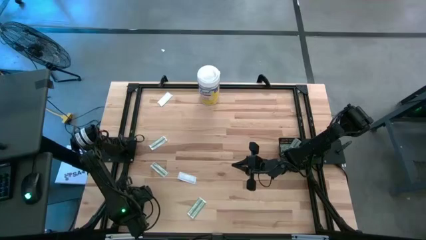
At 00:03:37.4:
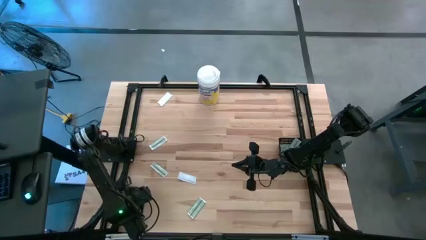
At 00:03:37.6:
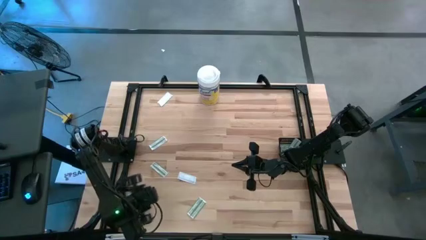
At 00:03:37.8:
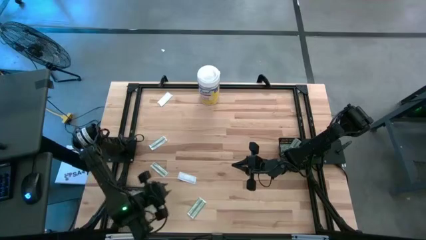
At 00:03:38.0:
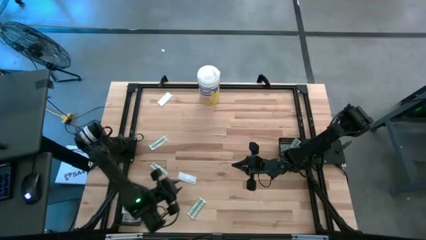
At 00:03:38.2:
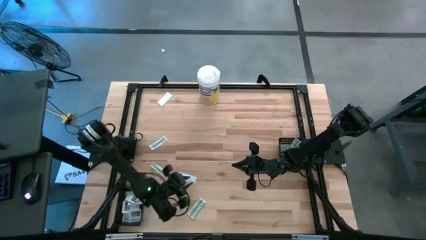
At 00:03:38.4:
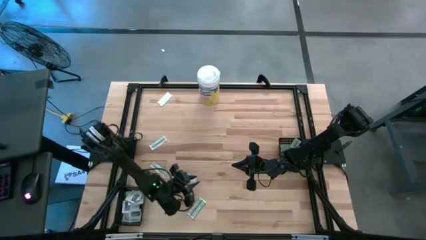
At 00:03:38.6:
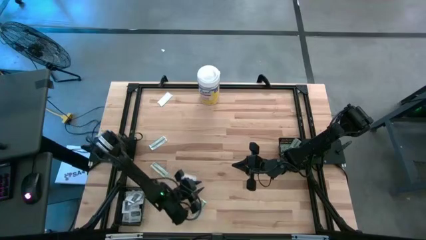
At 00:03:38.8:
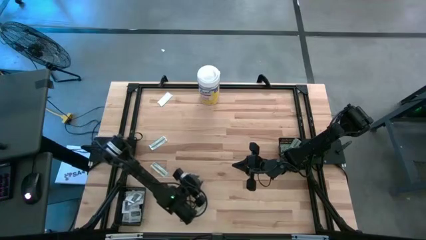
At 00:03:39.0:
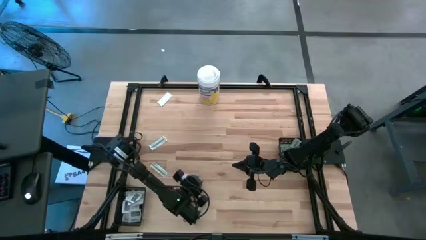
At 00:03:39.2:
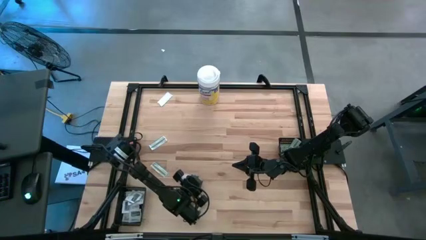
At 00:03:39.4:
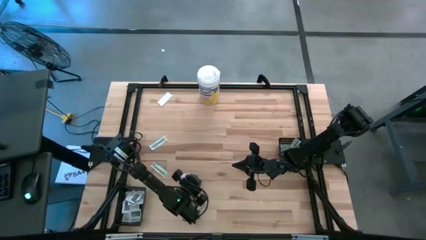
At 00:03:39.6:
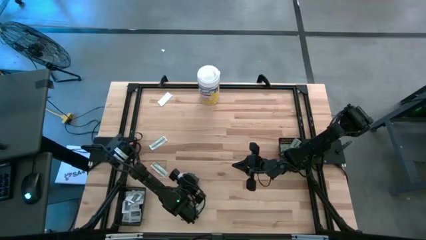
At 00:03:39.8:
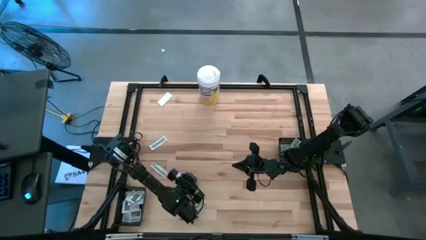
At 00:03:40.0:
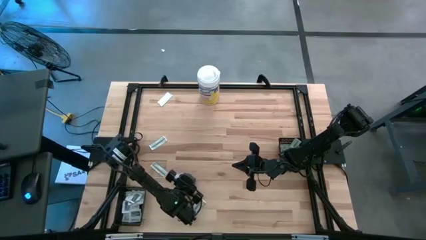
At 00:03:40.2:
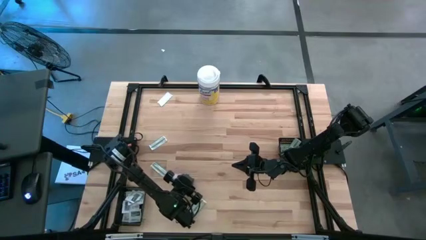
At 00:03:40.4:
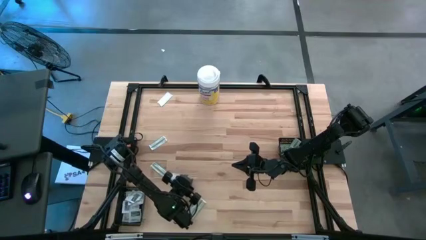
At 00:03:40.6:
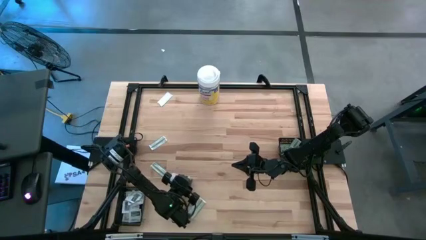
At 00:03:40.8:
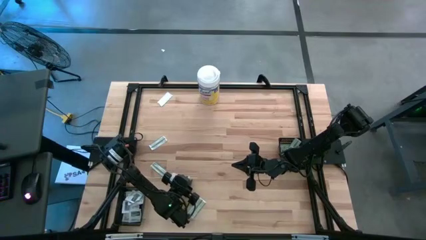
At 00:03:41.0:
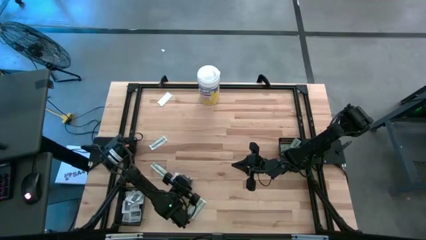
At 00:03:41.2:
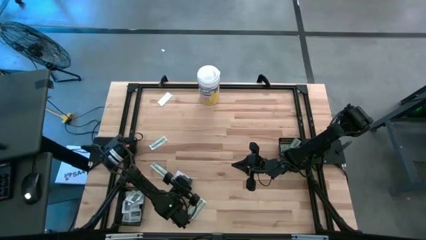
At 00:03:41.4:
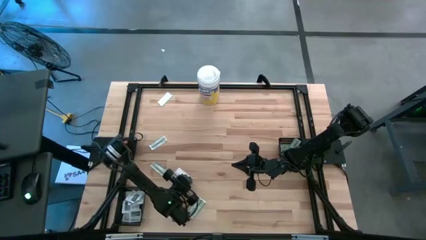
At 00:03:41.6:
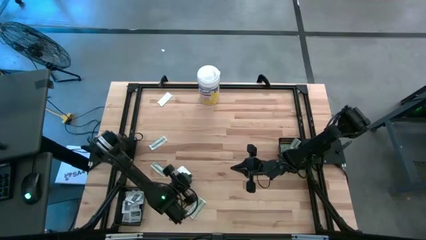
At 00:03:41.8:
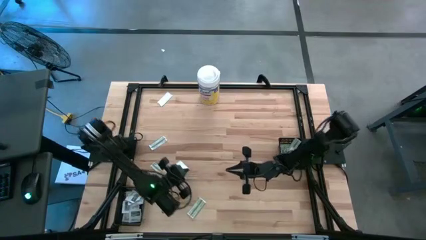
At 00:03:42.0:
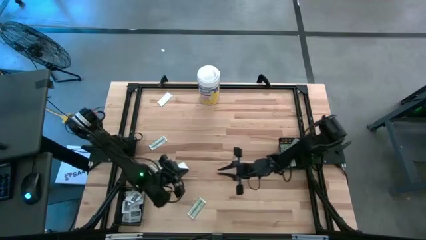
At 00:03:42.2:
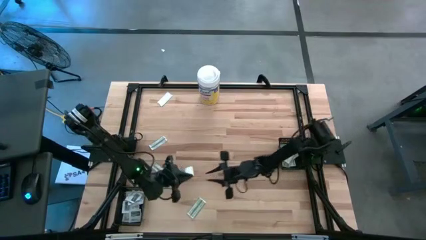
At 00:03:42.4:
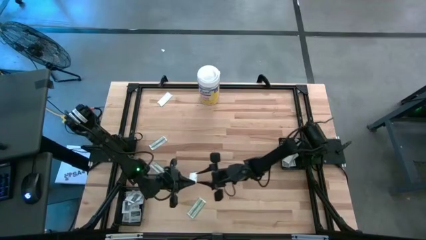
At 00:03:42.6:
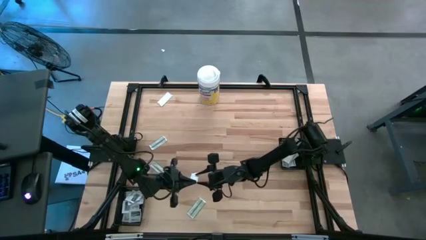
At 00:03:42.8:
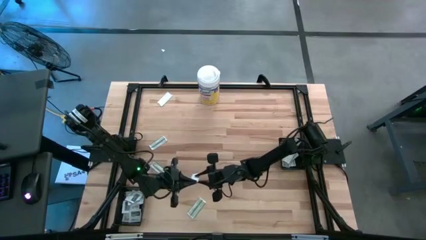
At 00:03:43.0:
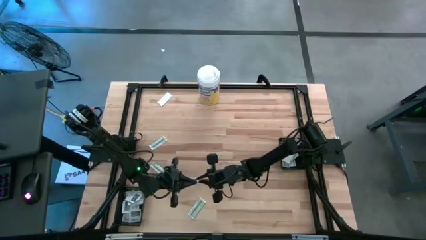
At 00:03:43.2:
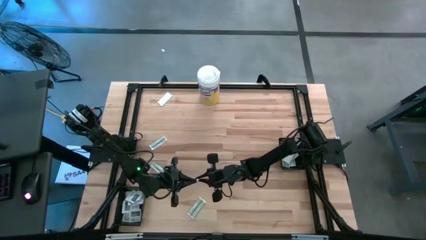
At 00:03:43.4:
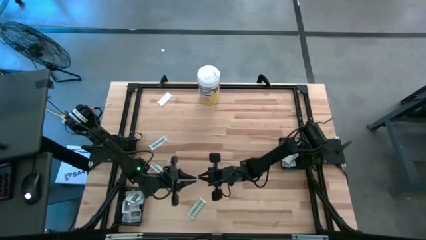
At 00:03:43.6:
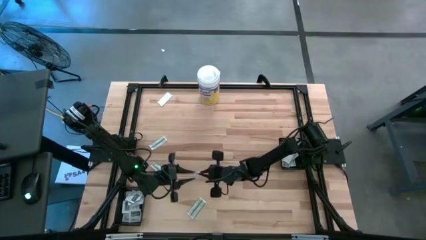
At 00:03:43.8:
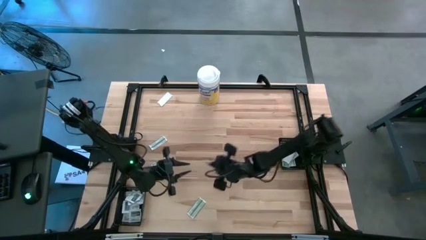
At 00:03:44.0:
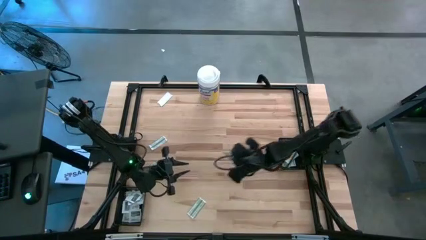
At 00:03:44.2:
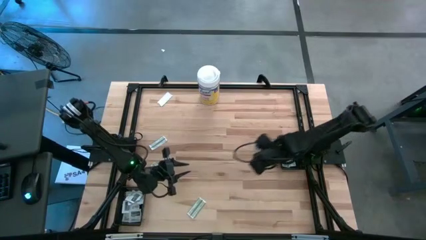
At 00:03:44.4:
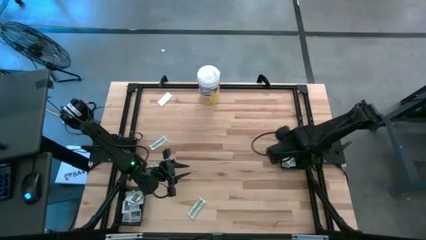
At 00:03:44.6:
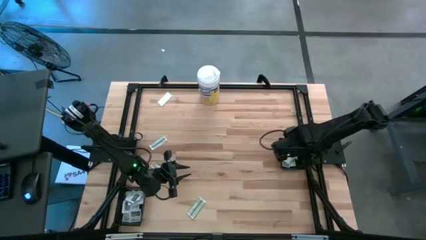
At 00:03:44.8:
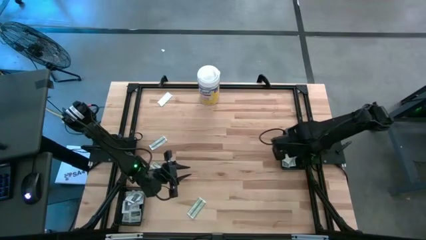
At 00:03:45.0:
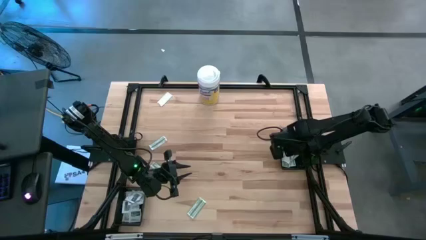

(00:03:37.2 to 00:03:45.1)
Task: Pick & Place First Aid Supplies
Put the white bandage pad into the right black bin

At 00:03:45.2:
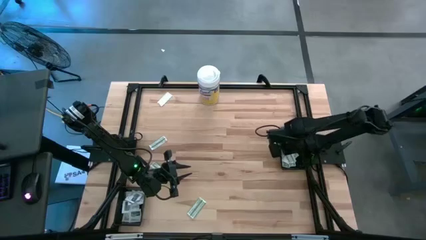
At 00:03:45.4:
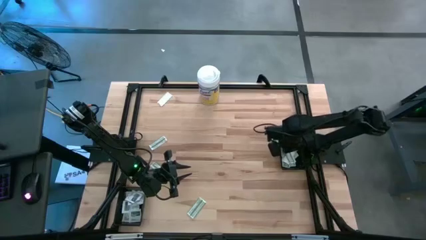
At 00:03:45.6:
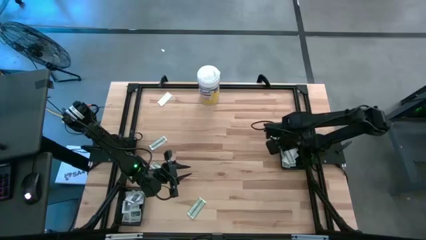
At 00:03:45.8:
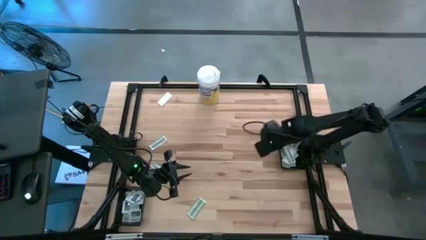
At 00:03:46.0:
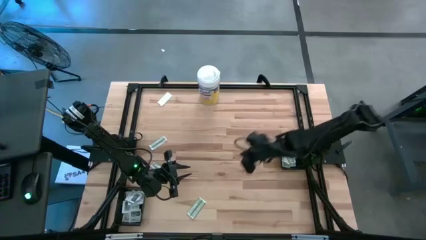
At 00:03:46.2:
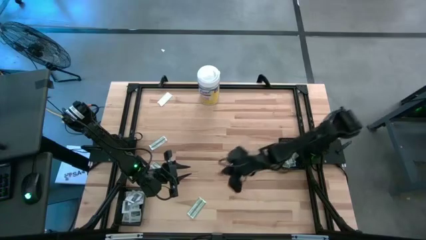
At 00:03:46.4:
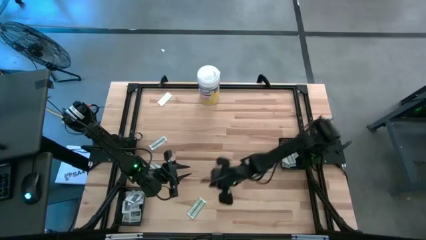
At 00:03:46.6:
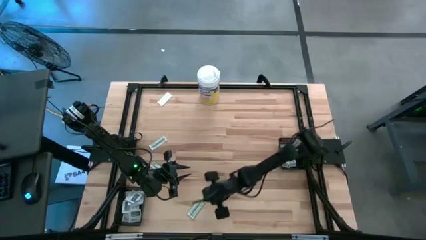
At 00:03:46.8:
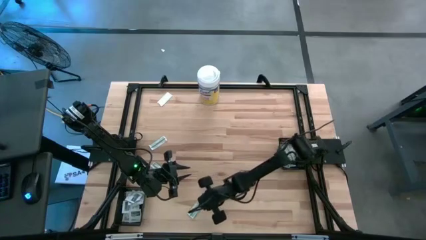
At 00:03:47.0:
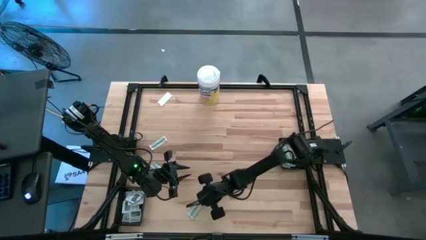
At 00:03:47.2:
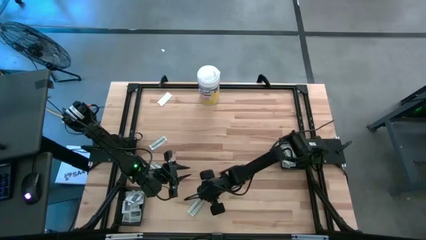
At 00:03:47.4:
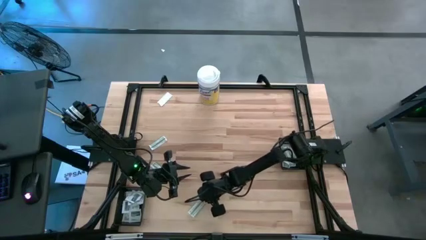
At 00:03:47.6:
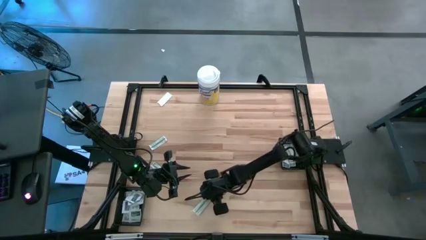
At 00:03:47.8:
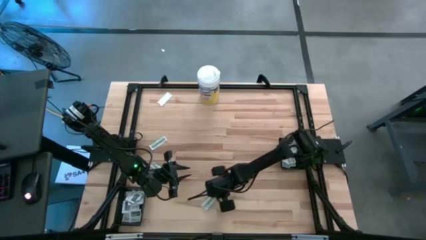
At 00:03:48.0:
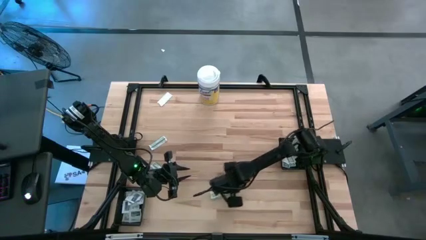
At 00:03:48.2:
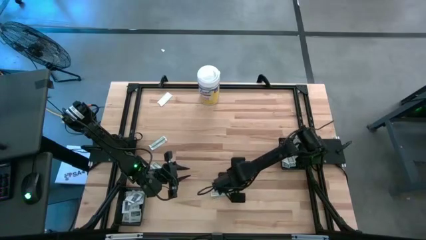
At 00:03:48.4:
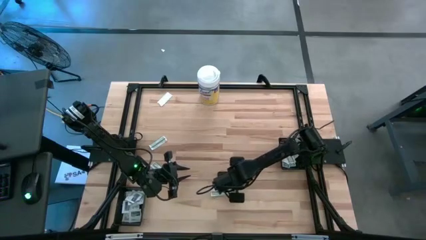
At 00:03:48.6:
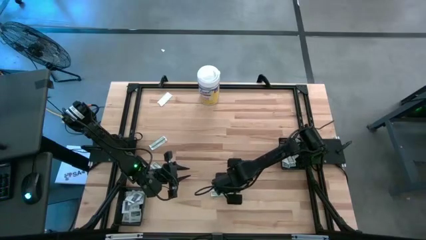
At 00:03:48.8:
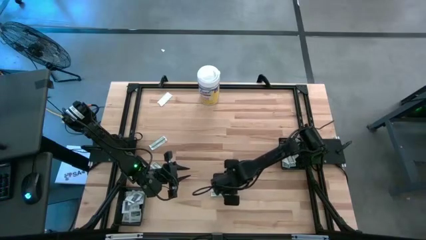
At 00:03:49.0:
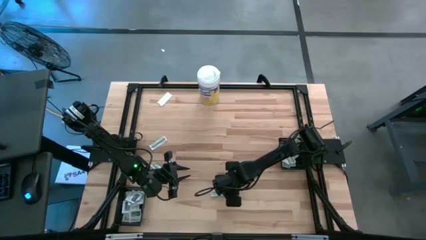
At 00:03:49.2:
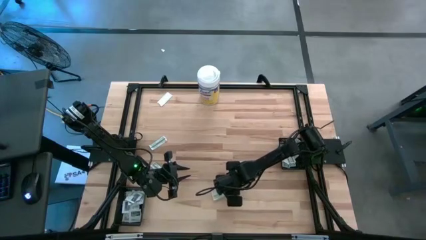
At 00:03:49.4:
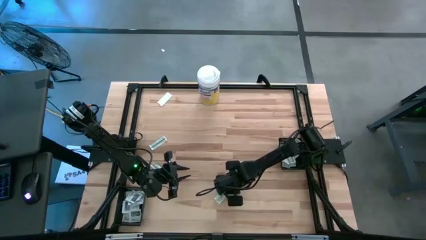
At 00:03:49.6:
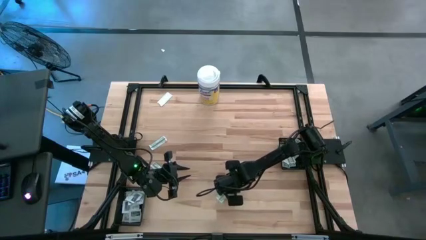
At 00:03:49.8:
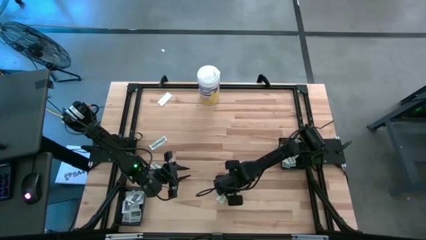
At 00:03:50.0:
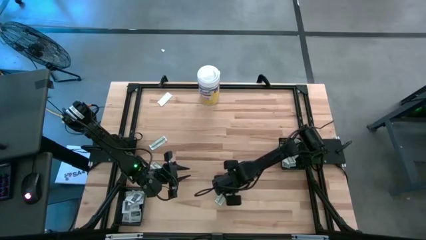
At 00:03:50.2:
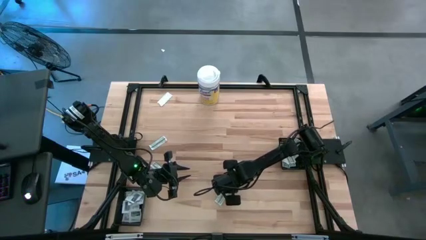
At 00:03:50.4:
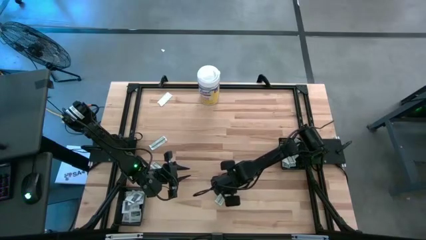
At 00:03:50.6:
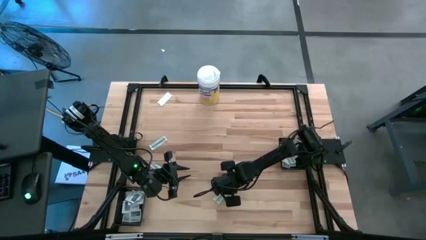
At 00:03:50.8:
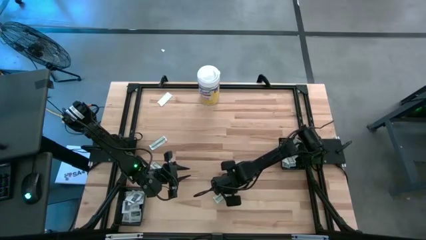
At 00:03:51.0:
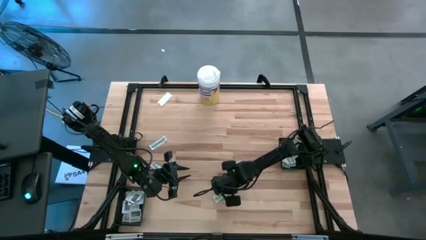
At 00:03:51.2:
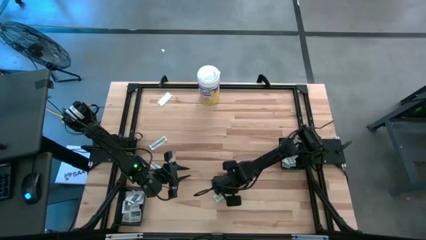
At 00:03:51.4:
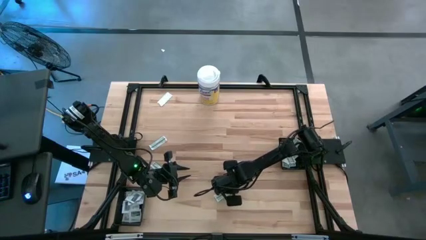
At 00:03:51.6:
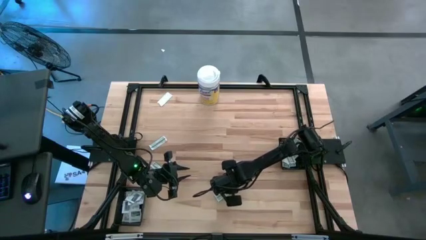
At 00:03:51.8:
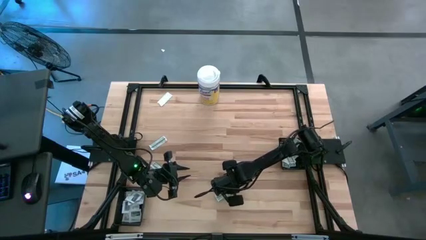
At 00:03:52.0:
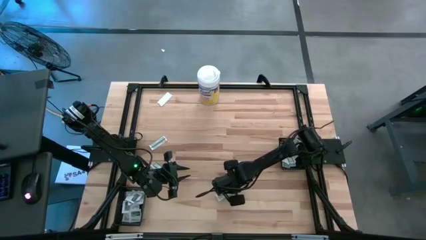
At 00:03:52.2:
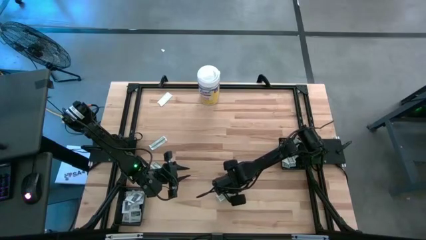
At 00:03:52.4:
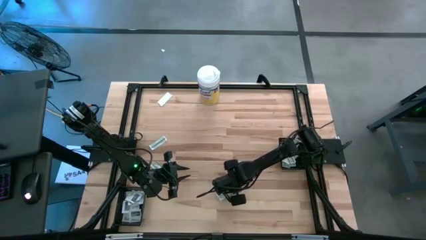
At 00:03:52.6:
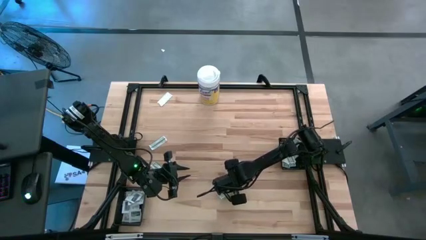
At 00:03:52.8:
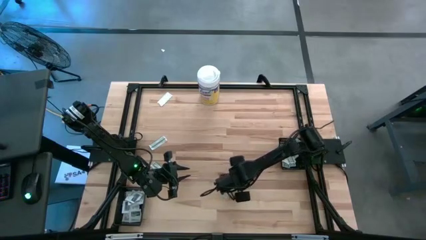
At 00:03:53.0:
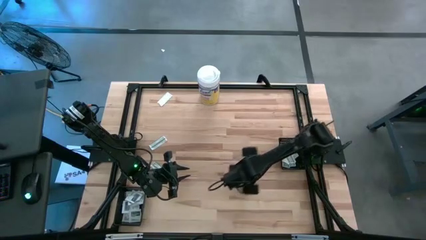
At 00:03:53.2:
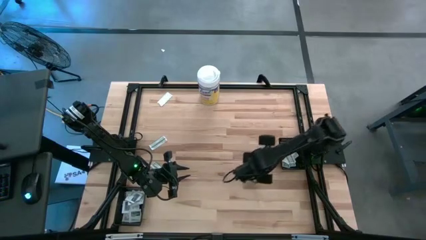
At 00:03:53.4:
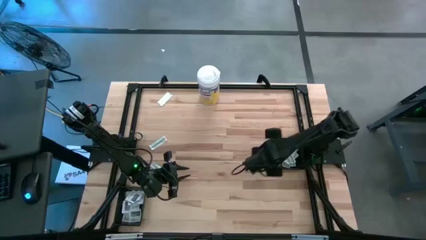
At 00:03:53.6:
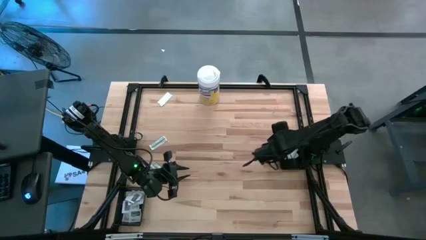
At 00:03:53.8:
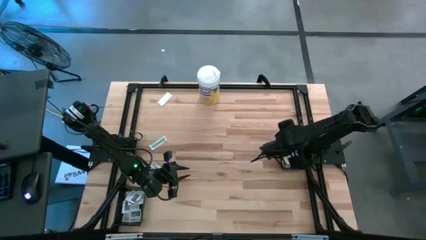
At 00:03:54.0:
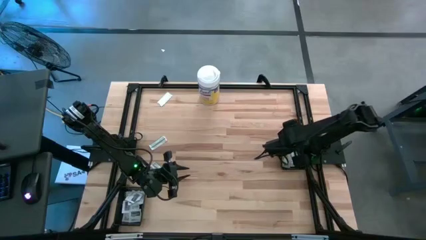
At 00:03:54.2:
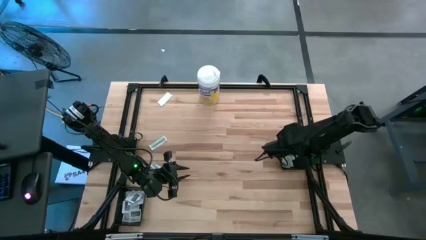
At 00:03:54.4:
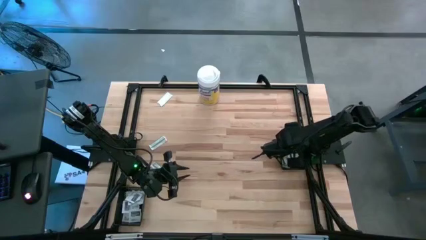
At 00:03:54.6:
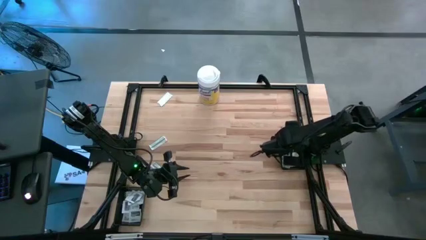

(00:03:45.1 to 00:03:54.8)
Put the white bandage pad into the right black bin
